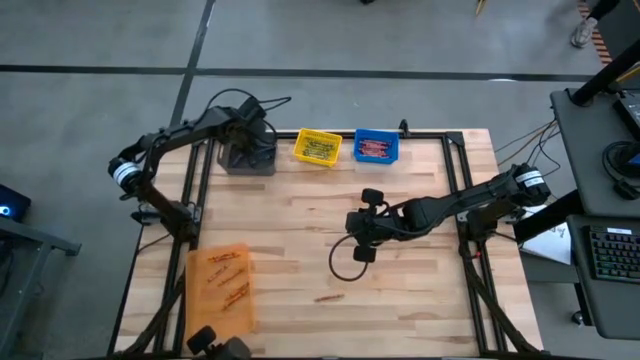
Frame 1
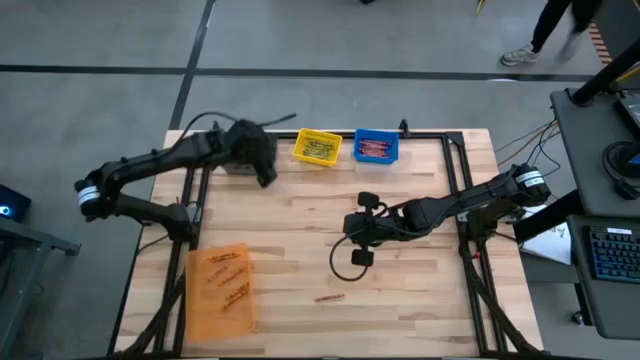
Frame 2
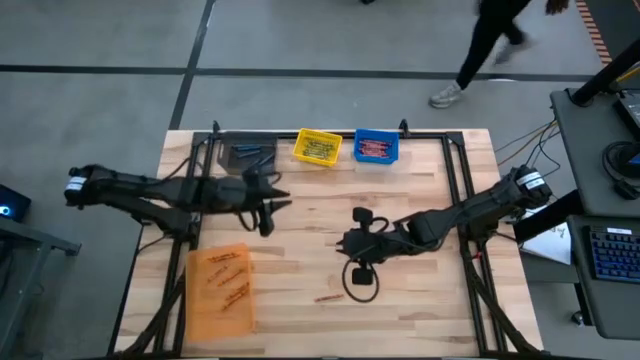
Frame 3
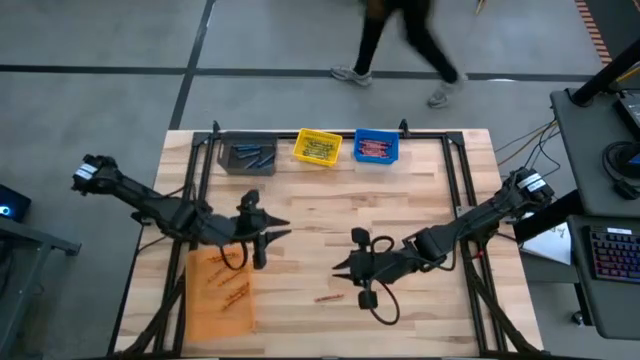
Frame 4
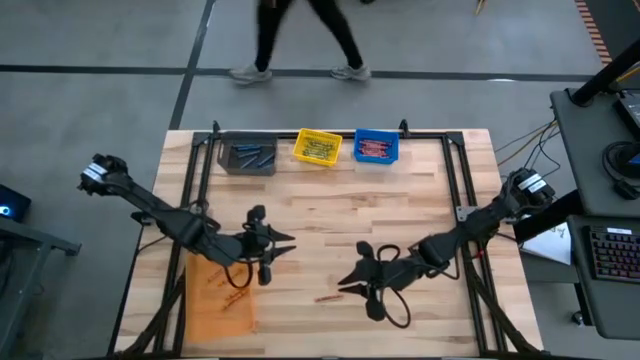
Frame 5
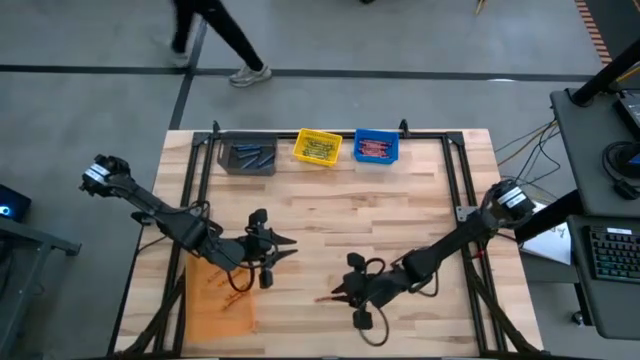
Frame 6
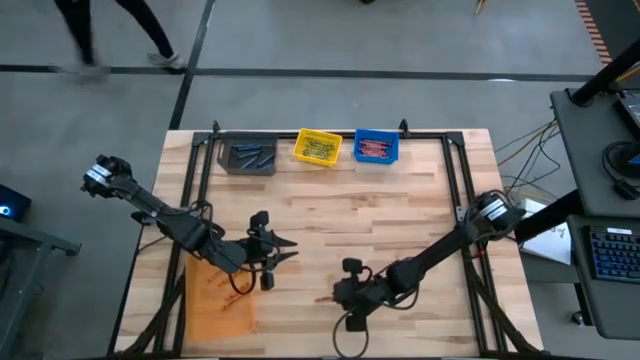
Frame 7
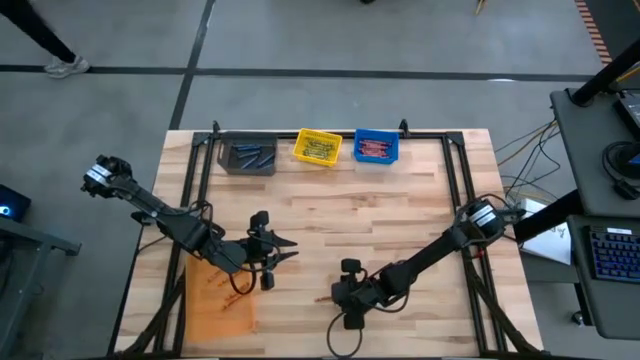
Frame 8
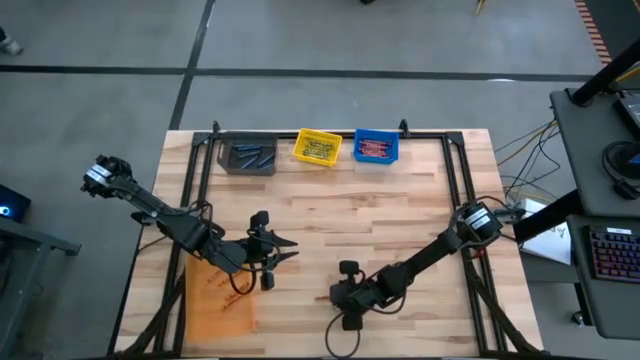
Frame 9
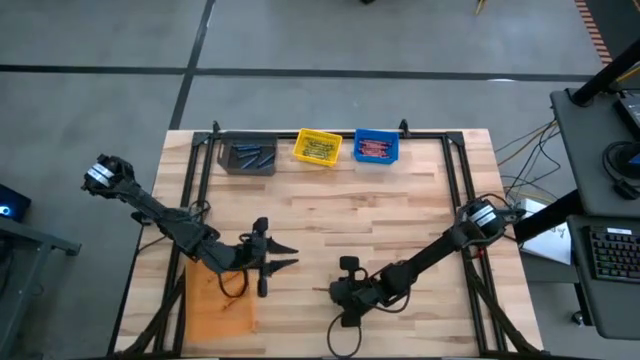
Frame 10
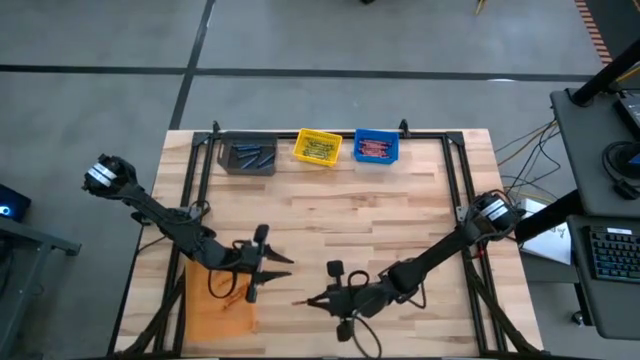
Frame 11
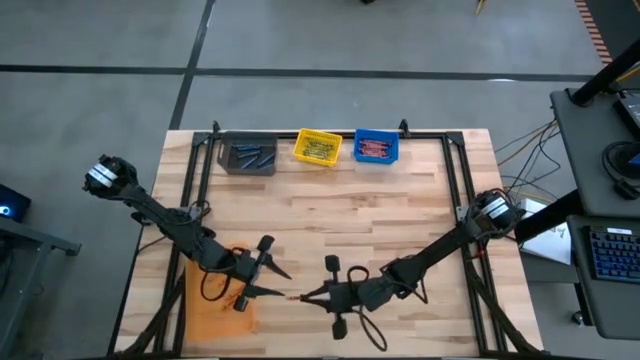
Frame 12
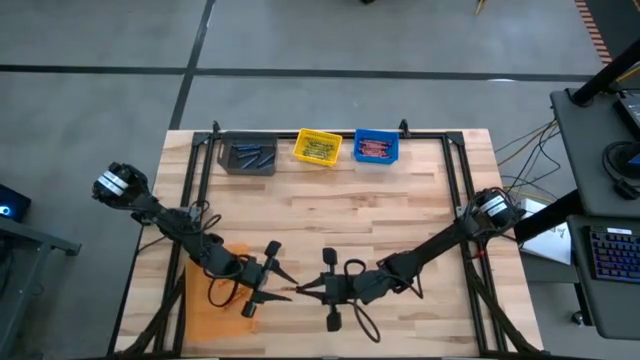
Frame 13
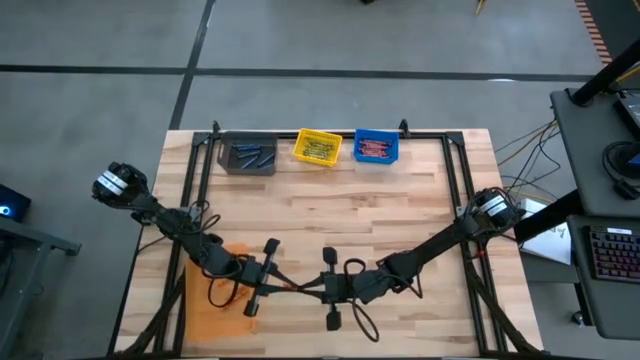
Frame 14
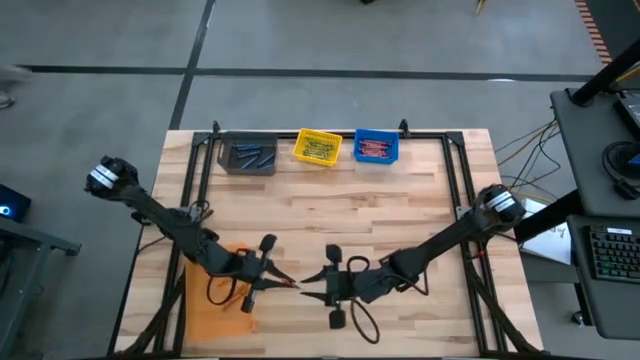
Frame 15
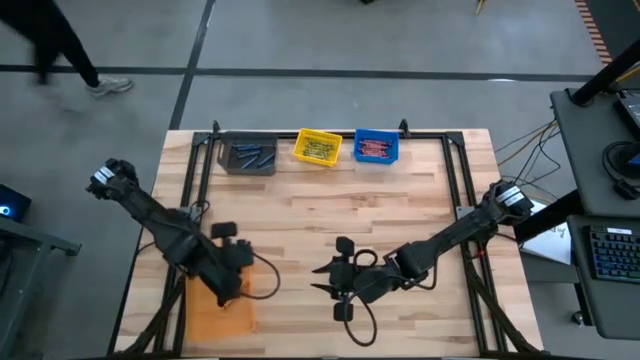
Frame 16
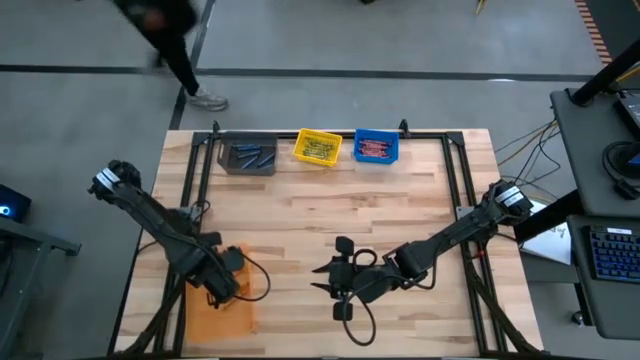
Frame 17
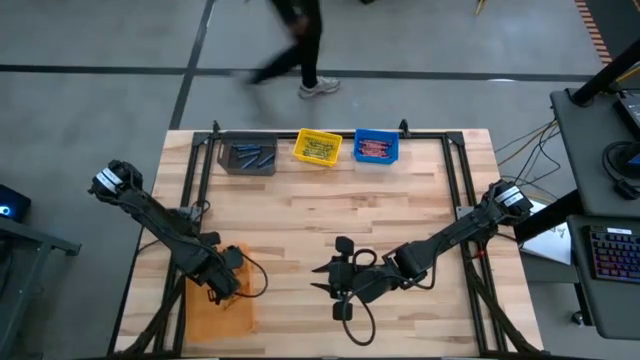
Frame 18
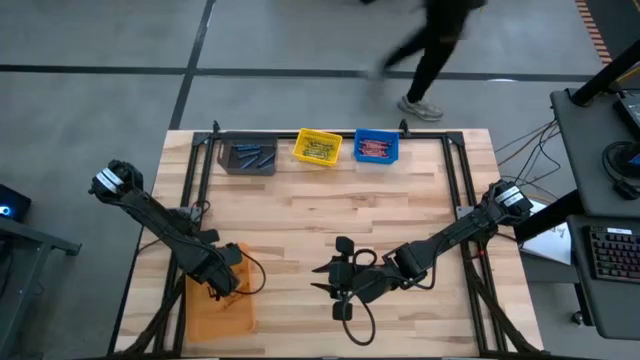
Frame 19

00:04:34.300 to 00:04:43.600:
Task: Sort crayons
Put the orange crayon into the orange bin

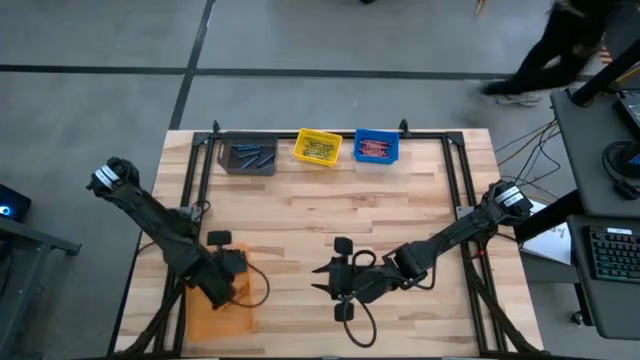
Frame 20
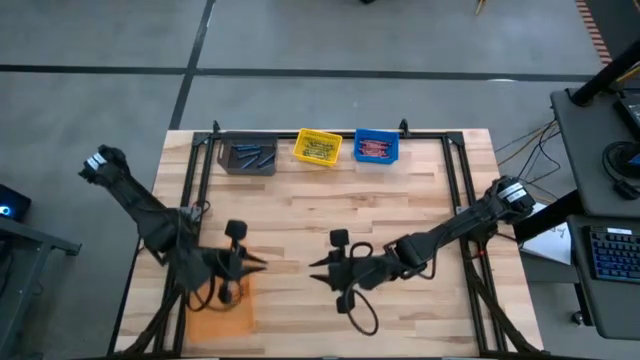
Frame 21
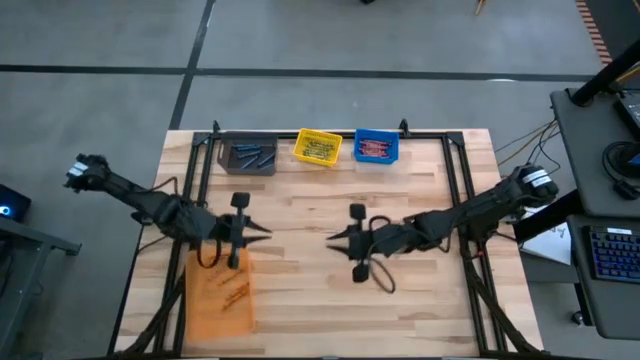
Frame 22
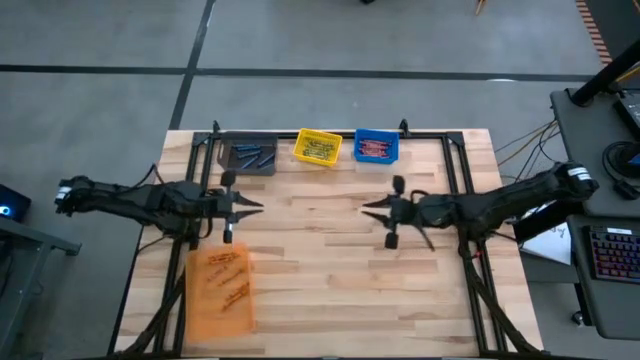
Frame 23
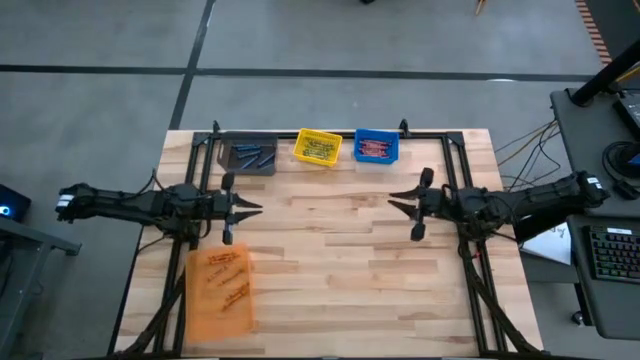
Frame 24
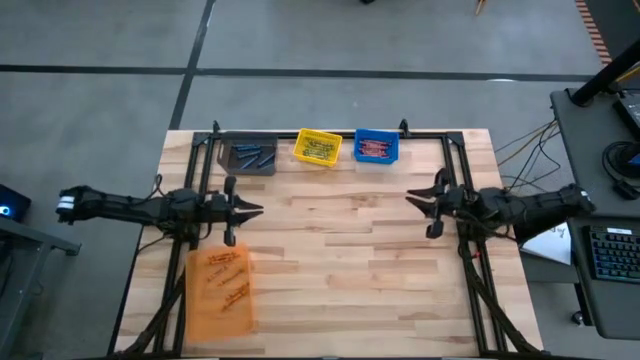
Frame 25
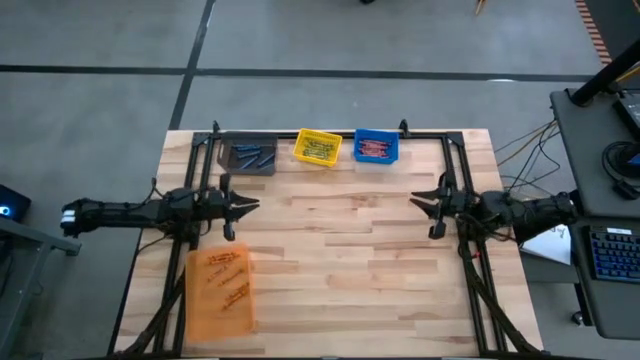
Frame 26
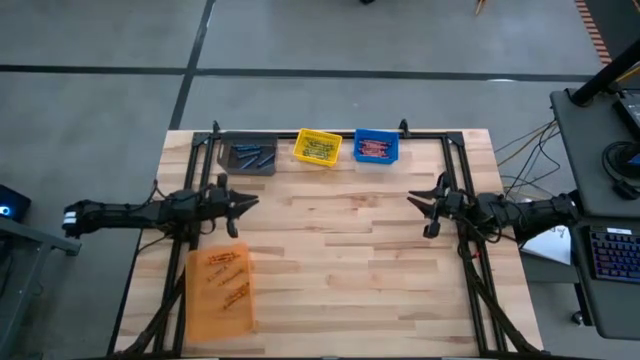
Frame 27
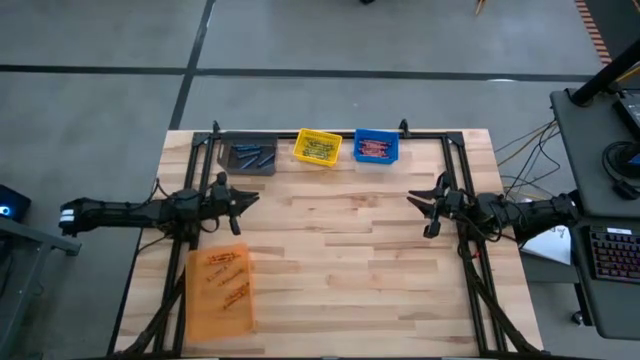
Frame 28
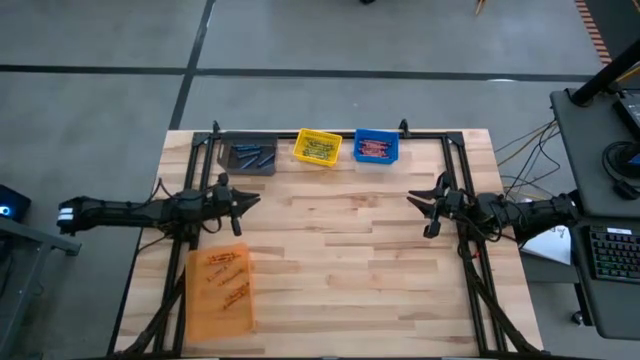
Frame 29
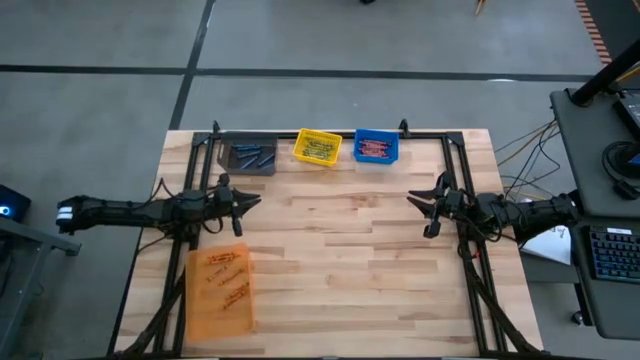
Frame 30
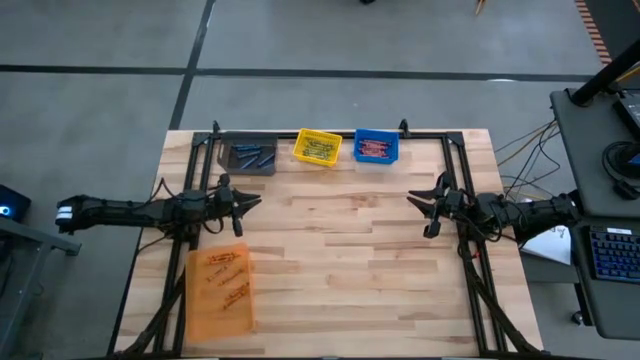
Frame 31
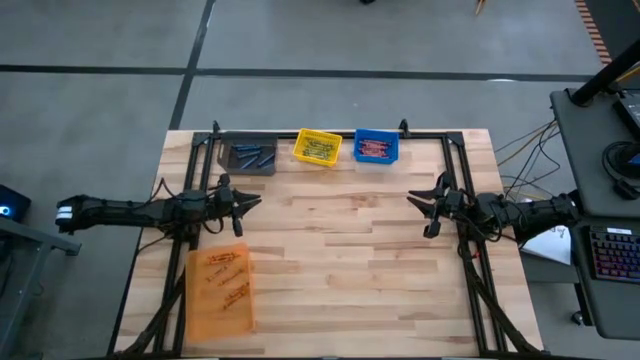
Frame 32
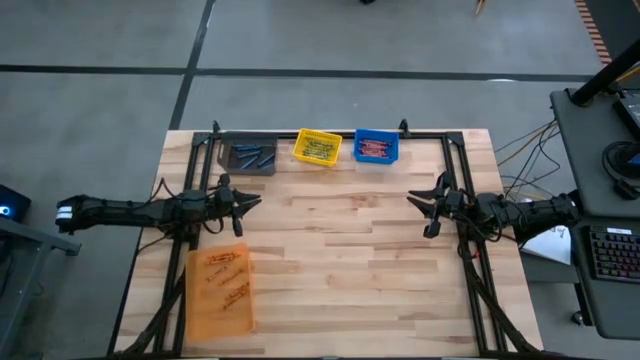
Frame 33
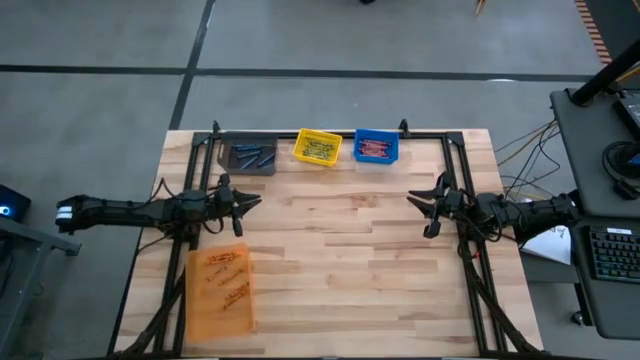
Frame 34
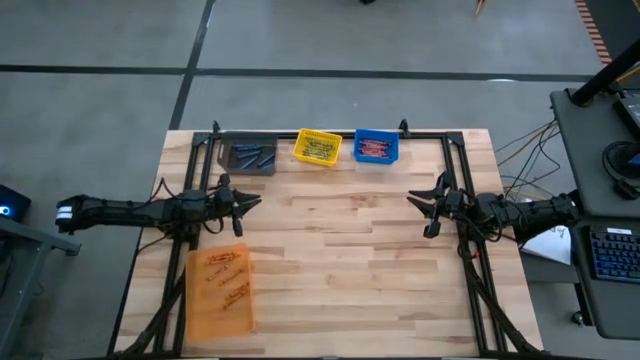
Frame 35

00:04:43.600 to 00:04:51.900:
Return to Home Position

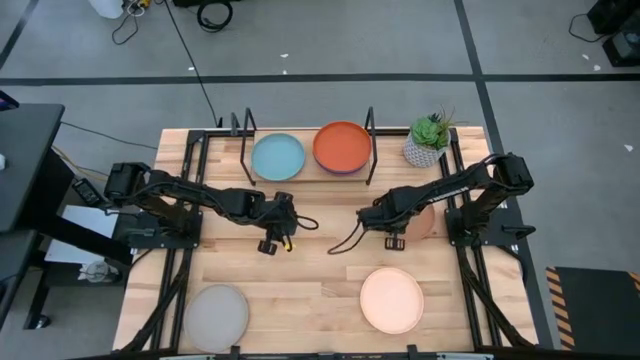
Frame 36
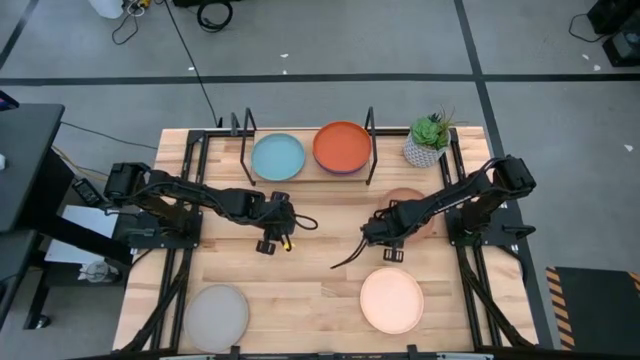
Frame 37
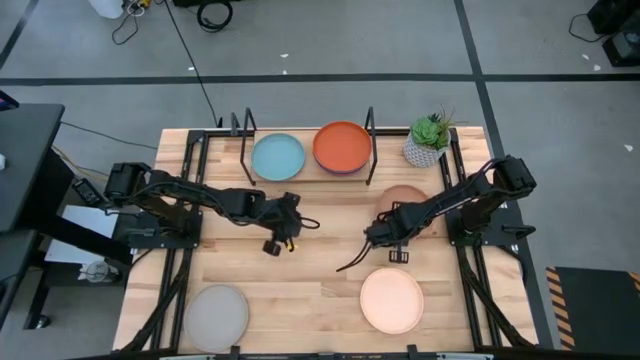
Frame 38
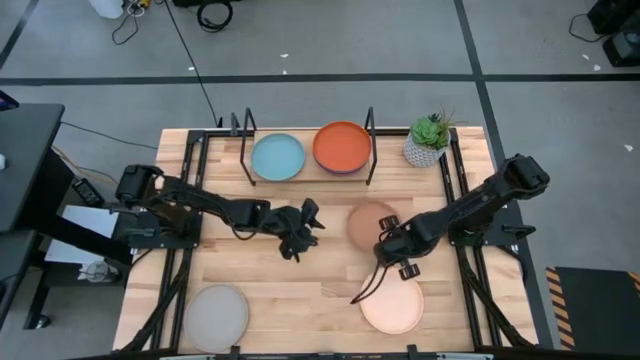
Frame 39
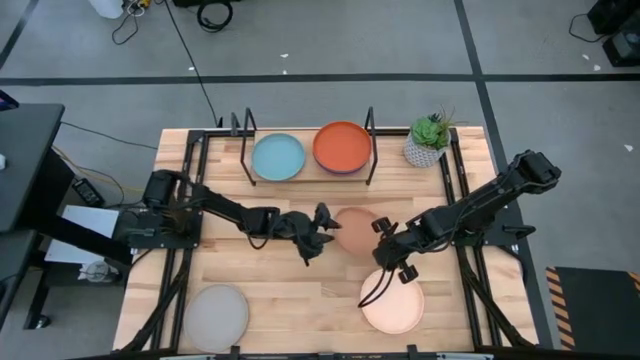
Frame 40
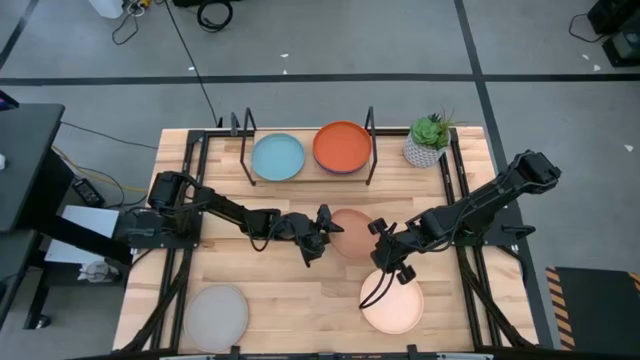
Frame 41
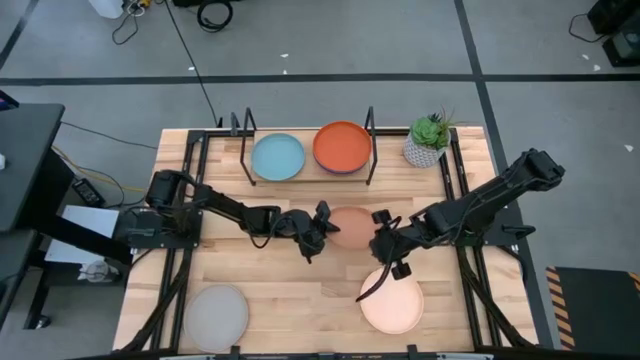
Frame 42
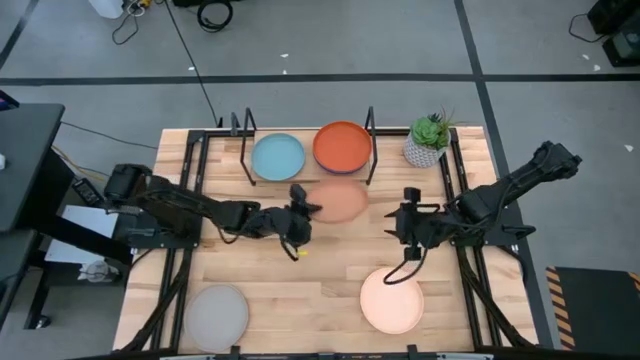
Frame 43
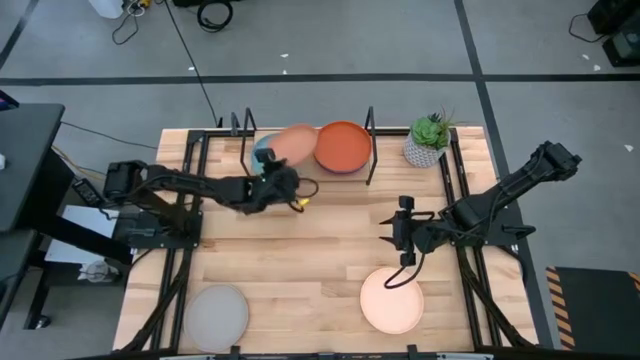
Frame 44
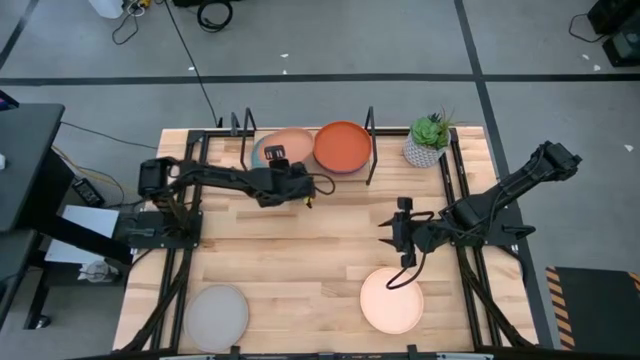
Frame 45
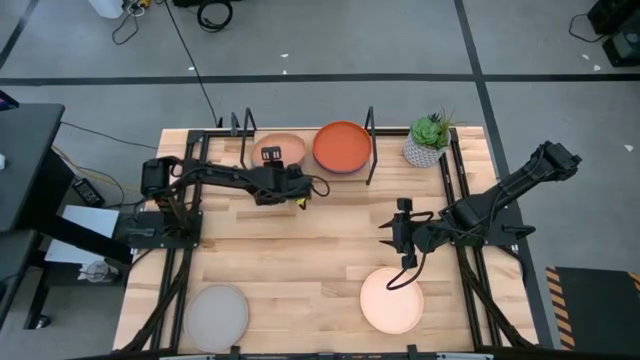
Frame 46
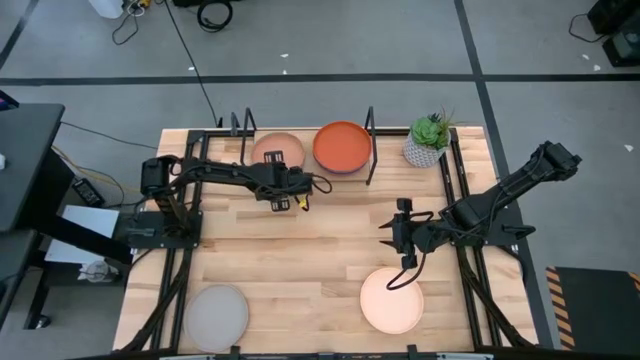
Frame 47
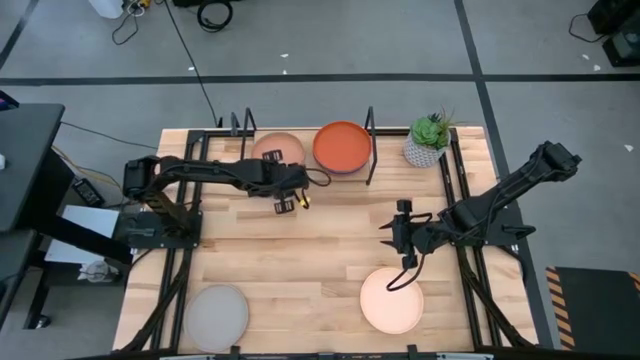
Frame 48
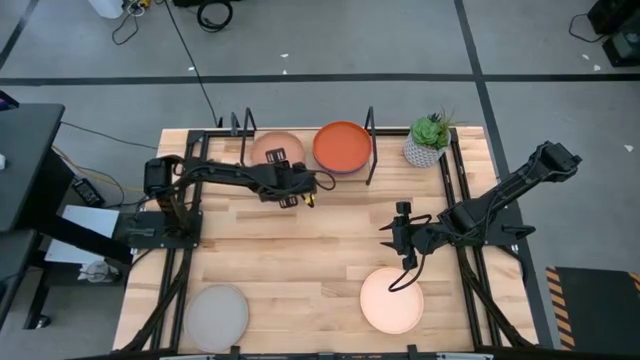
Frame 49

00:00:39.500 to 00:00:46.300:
Task: Place and stack plates onto a shelf
Stack the brown plate on top of the light blue plate on the shelf
